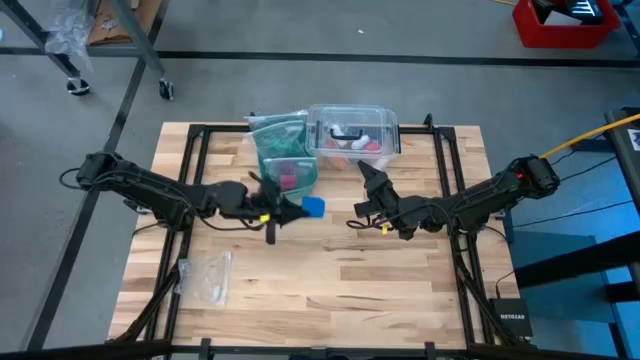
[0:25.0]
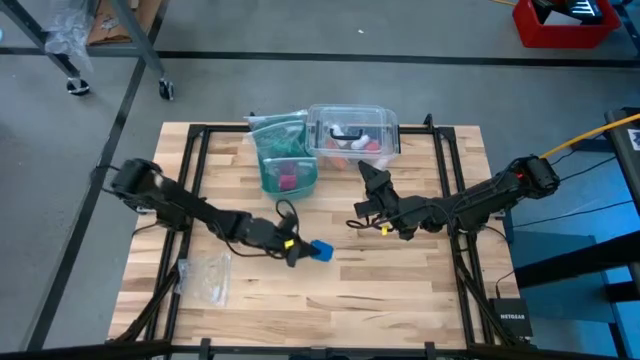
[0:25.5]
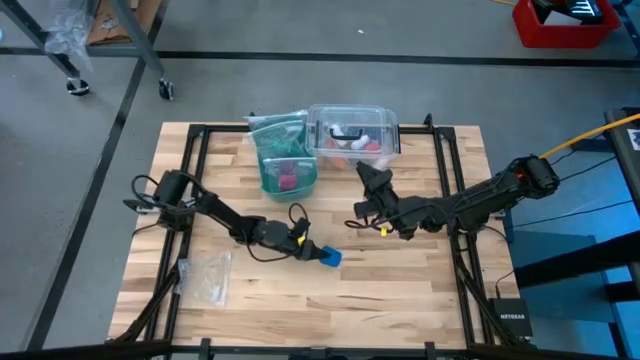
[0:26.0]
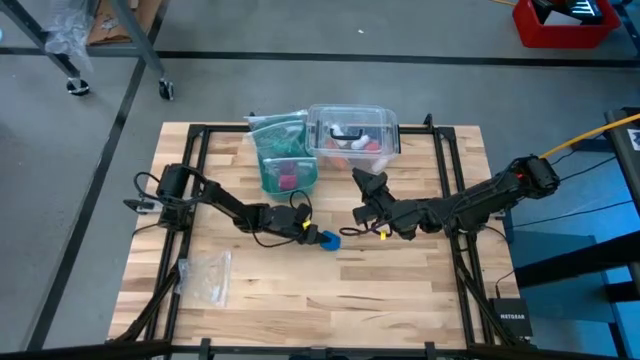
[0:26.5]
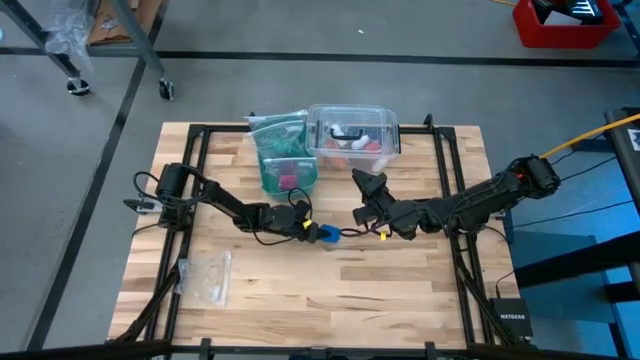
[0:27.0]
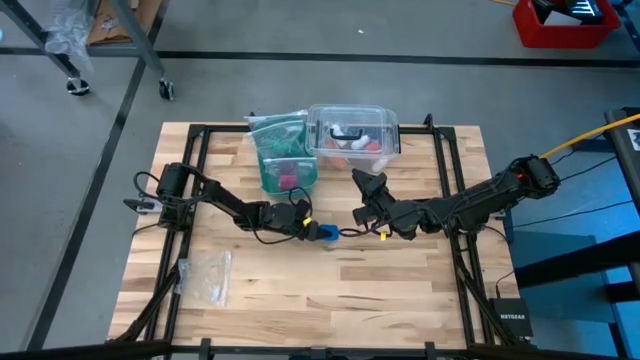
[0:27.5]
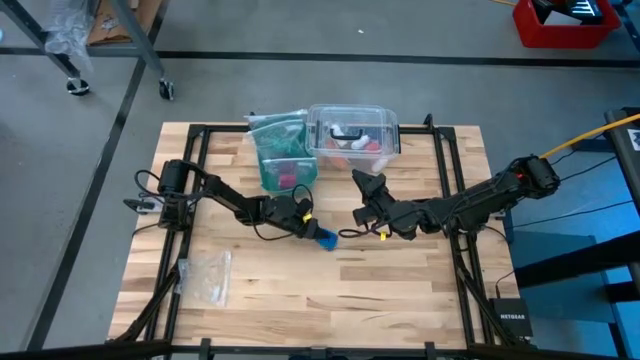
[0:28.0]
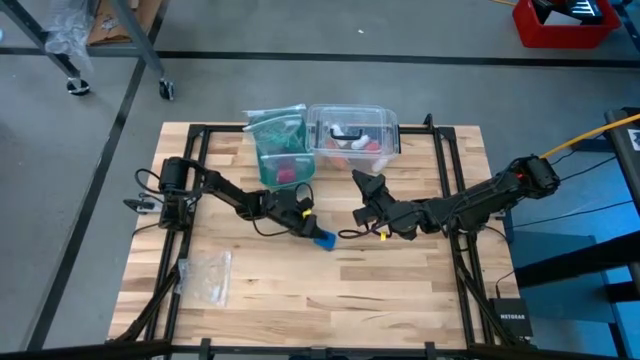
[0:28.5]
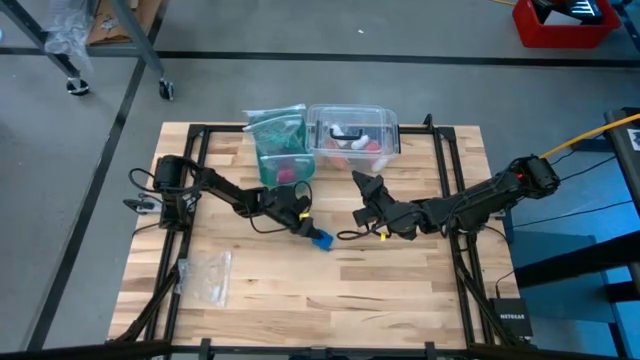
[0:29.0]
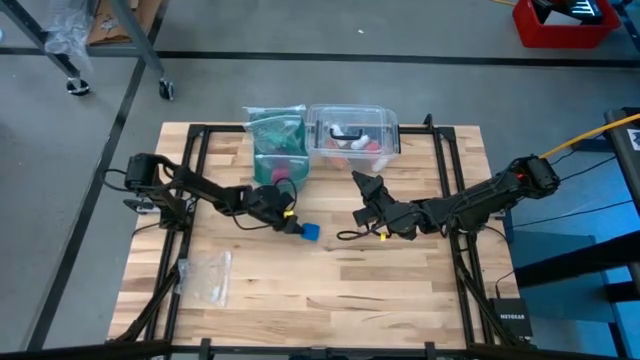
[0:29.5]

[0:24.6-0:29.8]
Task: Roll bandage
Put the blue bandage on the table

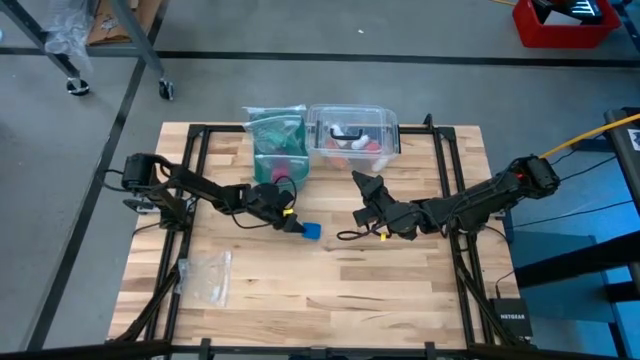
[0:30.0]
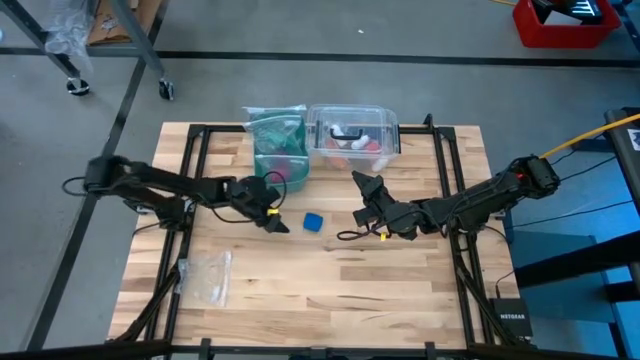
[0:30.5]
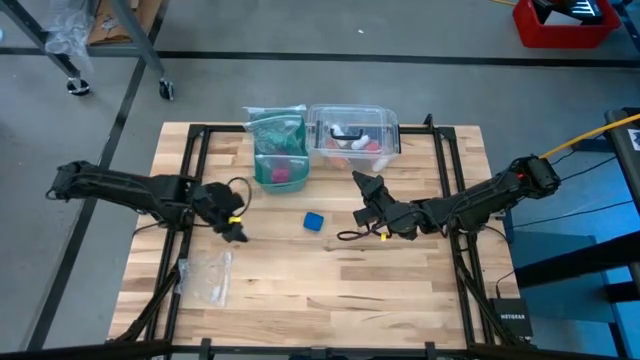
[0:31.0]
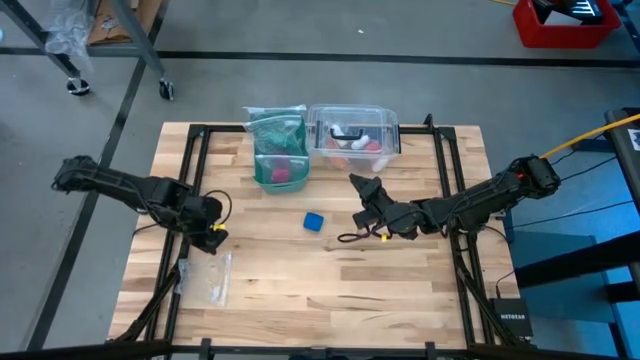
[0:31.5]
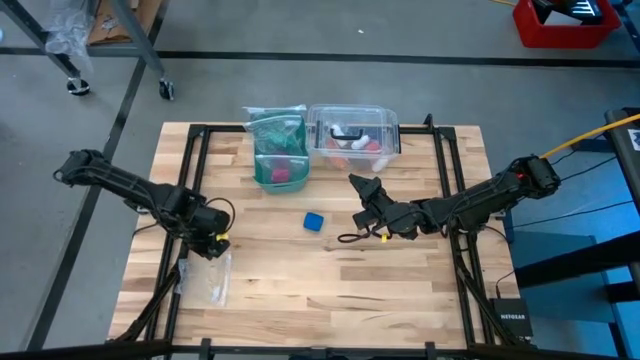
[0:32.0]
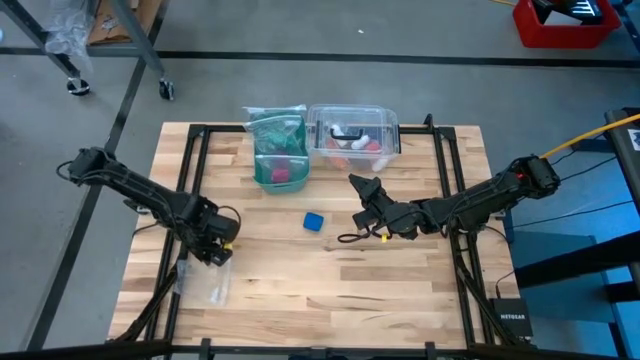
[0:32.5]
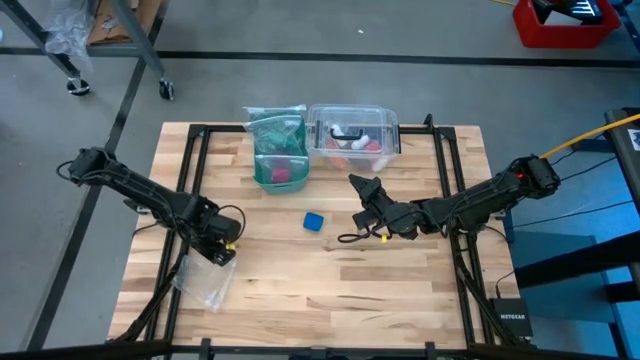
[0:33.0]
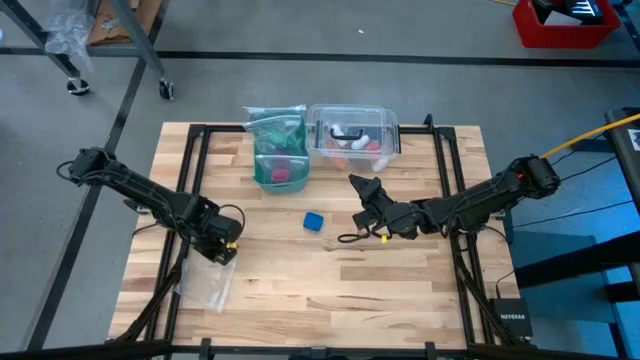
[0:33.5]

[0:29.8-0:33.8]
Open the transparent zip bag

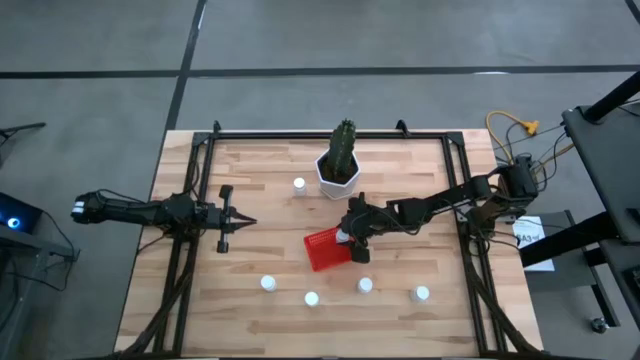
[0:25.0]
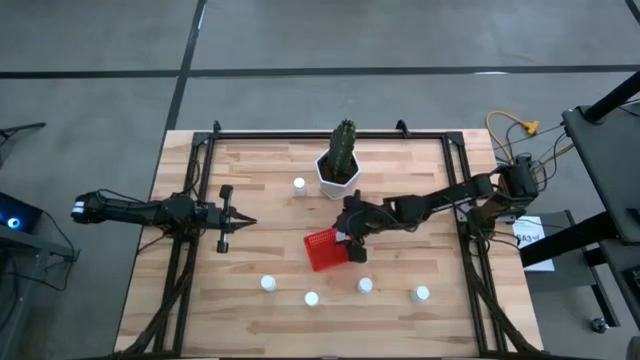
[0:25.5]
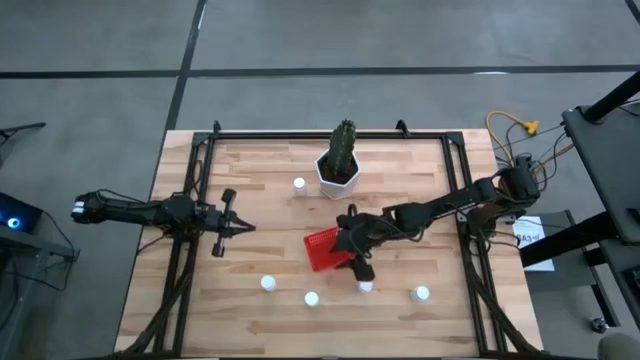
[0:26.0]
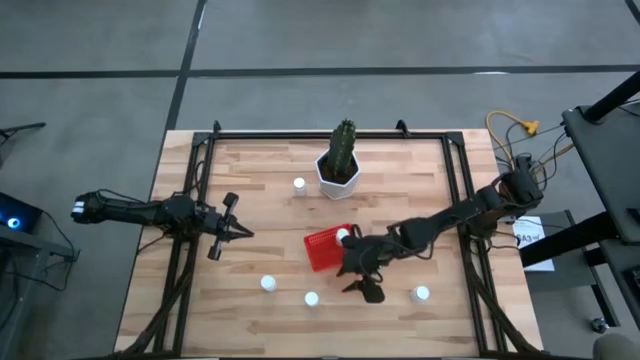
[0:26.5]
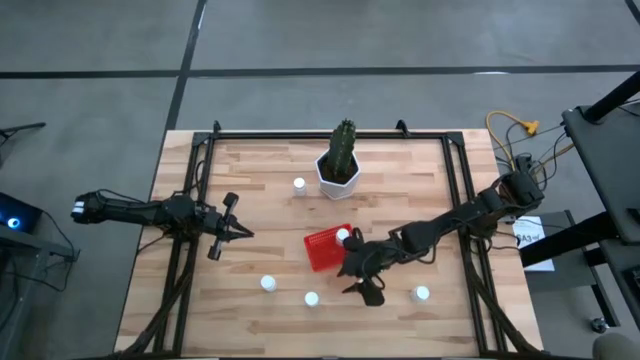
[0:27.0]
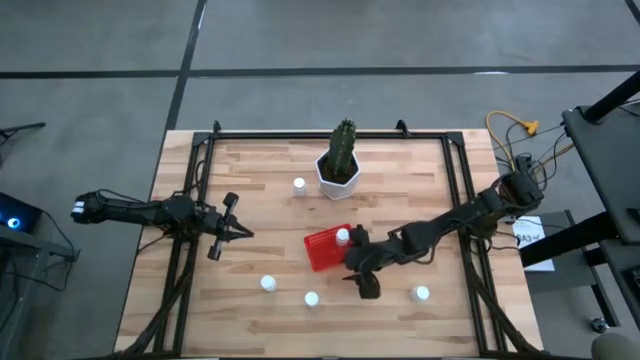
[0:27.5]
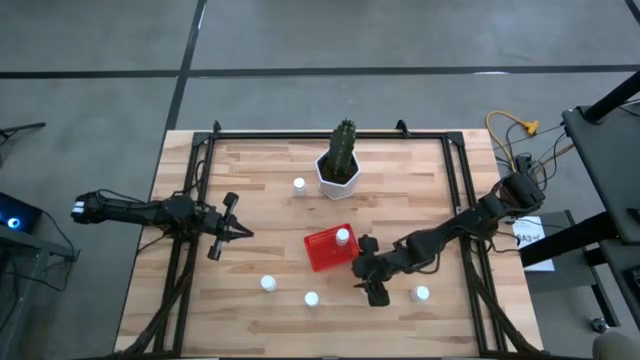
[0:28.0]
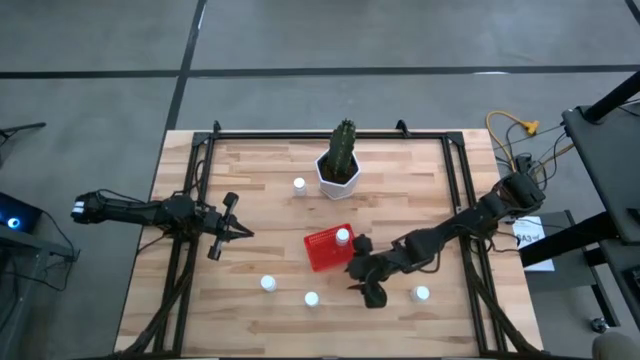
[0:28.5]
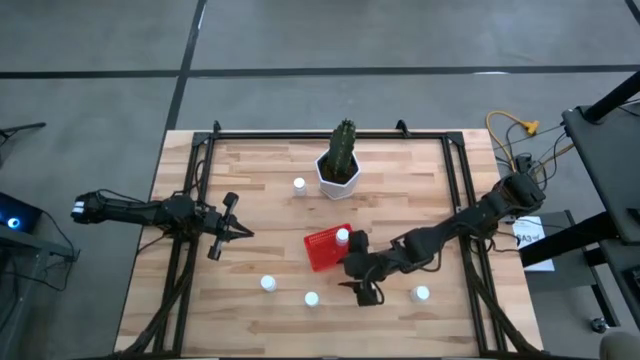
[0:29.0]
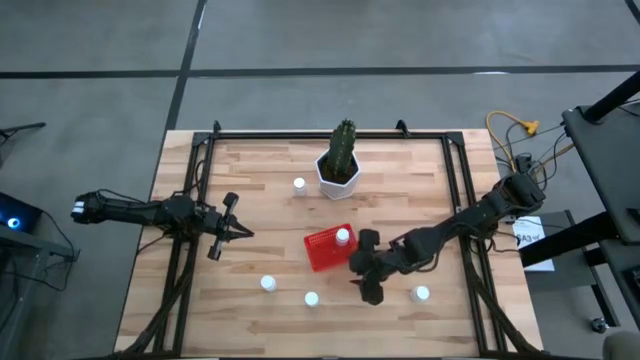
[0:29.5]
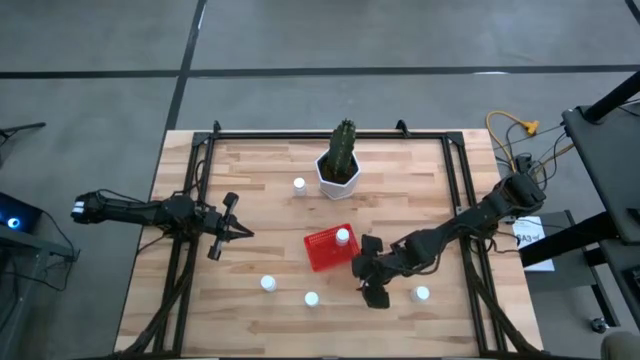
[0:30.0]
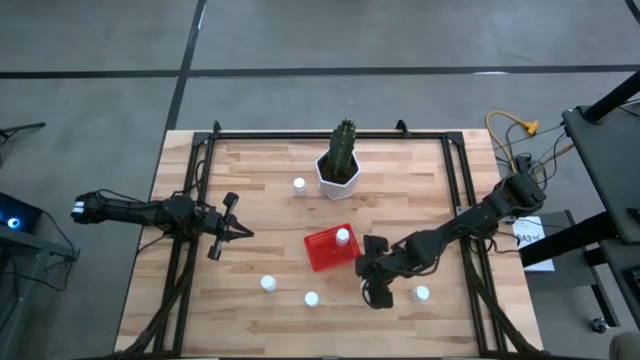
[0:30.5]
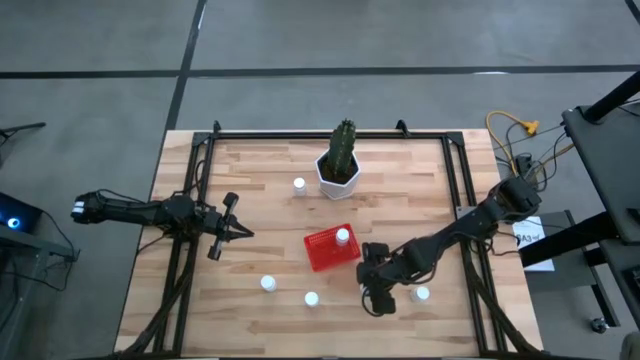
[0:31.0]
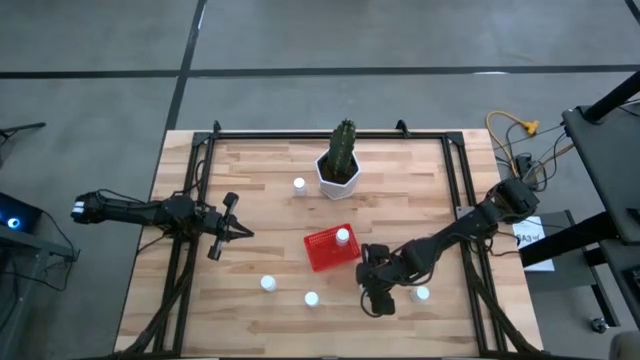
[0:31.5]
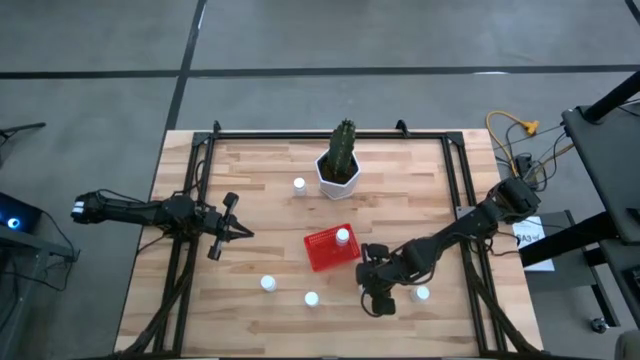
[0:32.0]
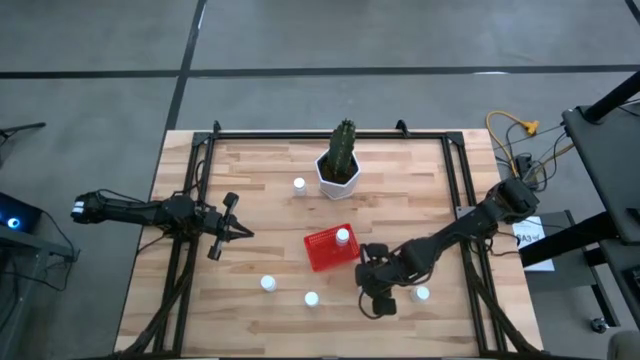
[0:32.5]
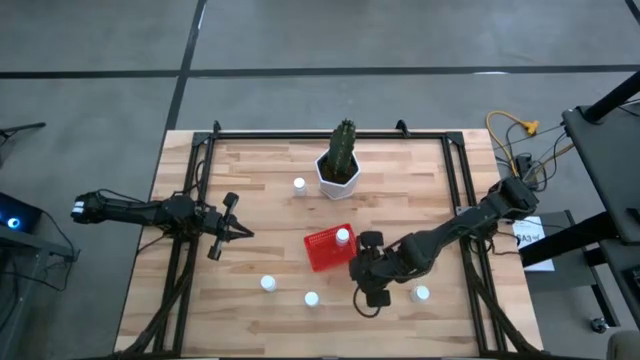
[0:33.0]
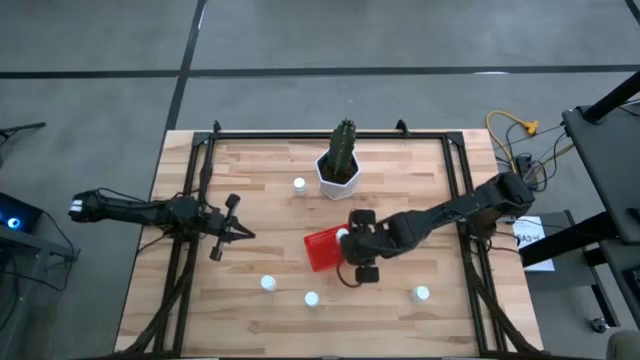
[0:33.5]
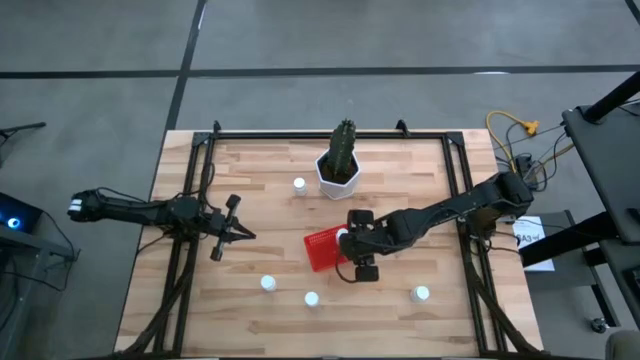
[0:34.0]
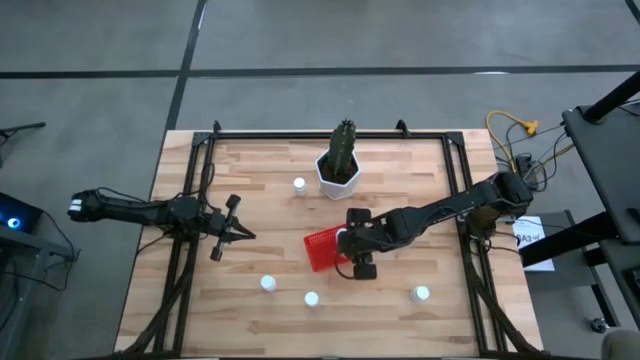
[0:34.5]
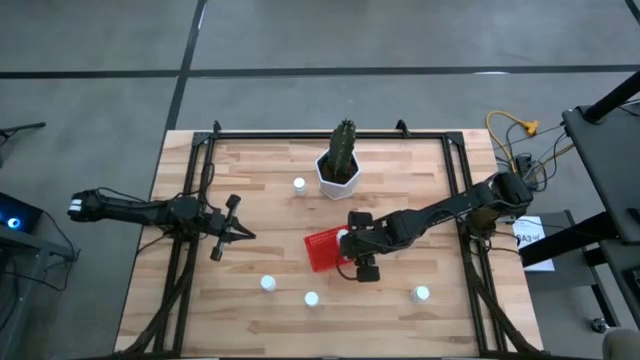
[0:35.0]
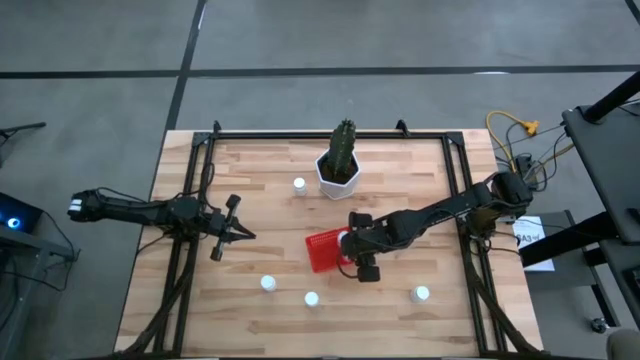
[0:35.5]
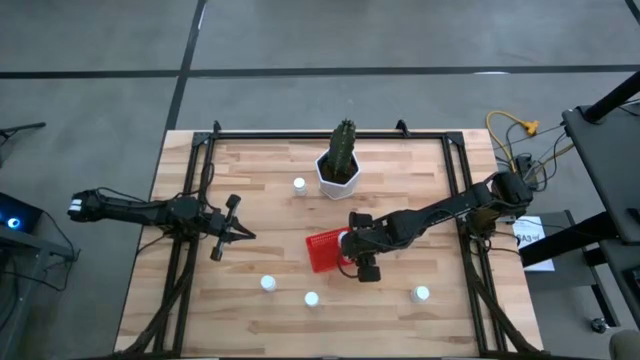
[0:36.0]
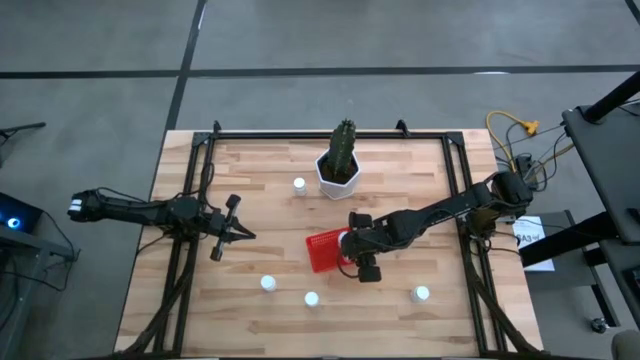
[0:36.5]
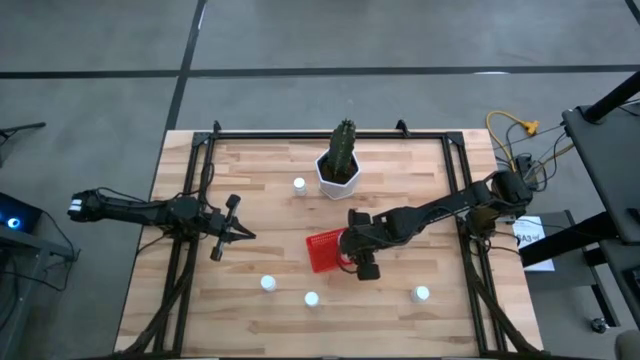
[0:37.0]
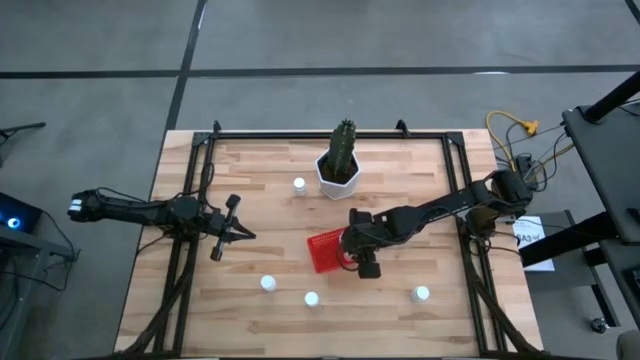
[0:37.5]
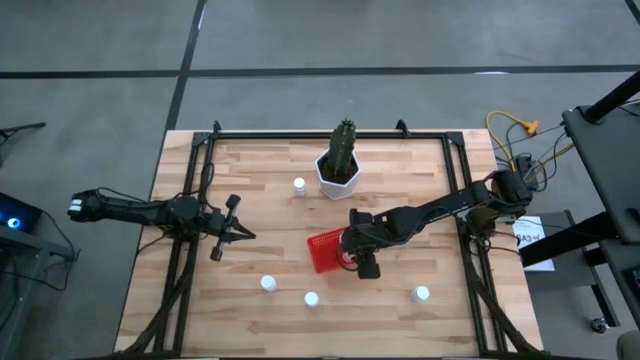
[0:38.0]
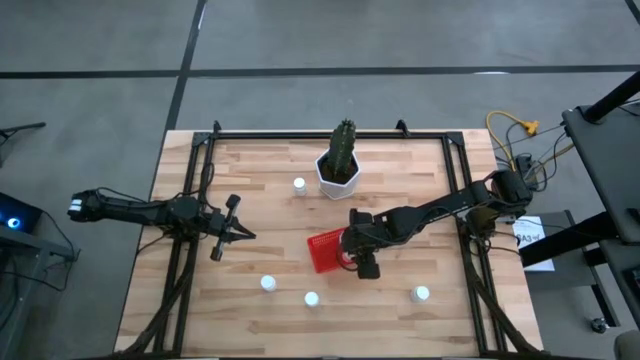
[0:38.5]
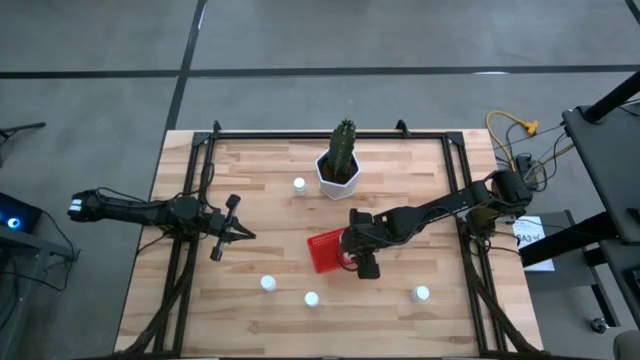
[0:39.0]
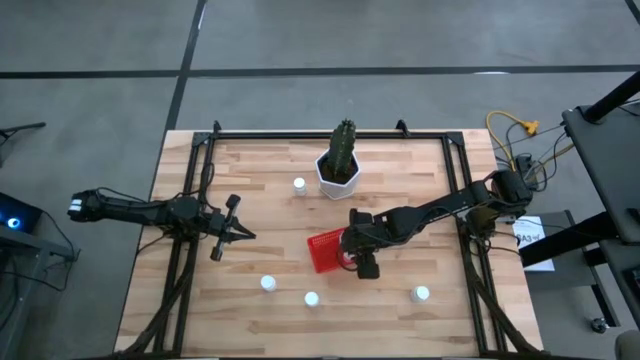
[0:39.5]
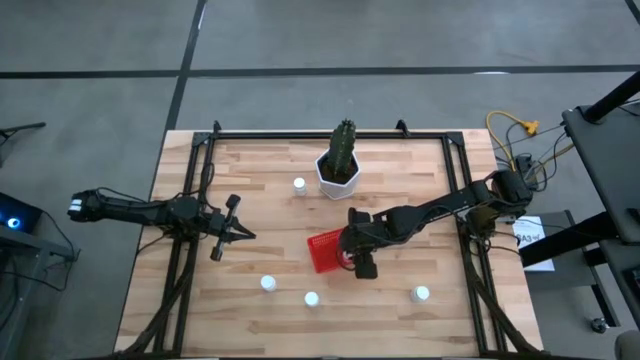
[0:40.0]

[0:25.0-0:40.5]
Task: Pick and place pill bottles into a basket
Put the white pill bottle into the red bin
